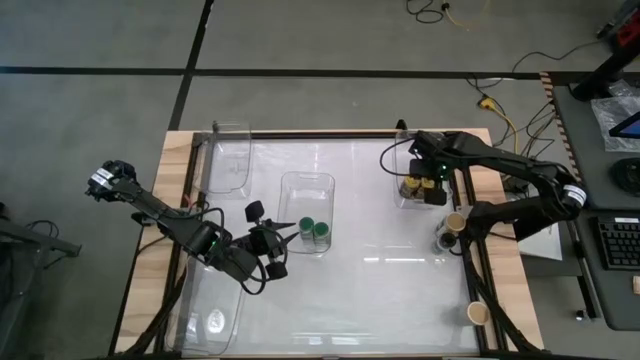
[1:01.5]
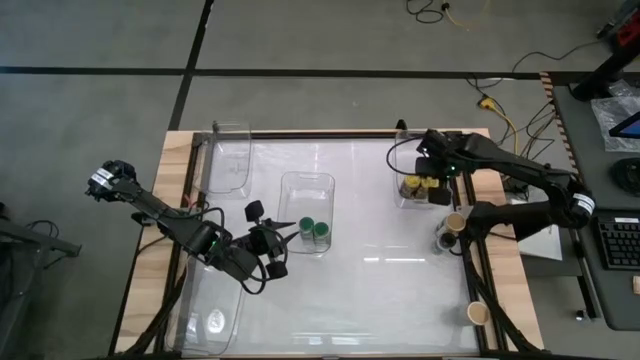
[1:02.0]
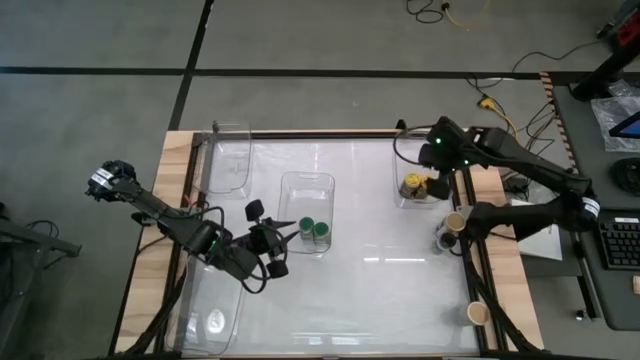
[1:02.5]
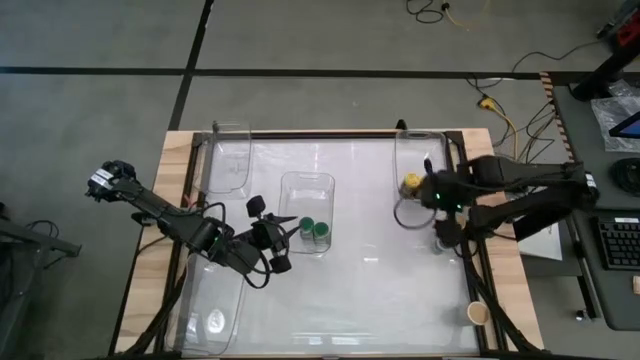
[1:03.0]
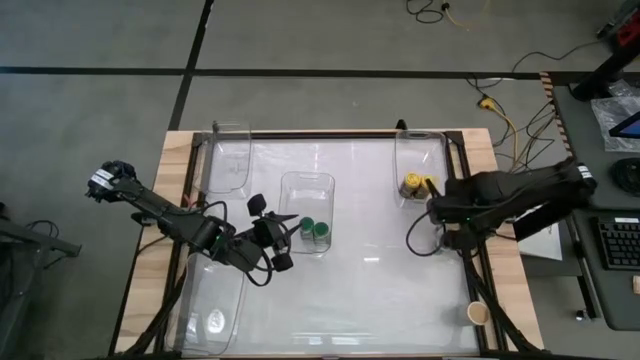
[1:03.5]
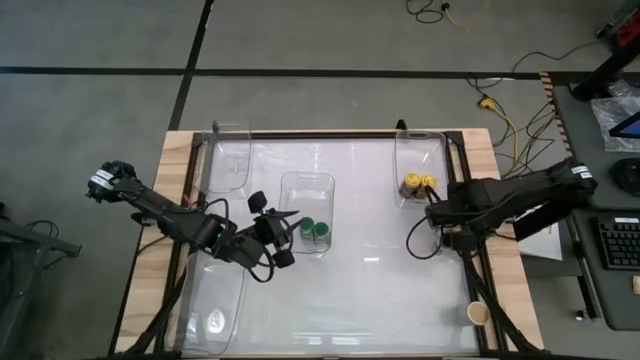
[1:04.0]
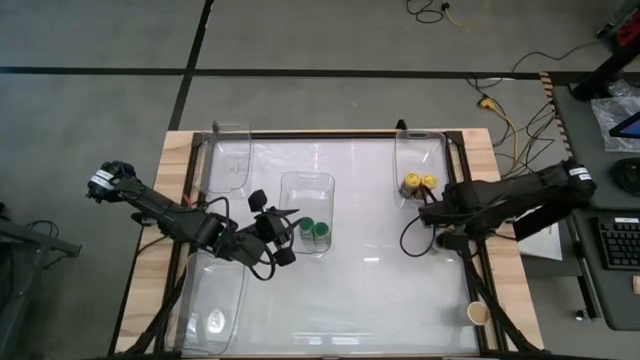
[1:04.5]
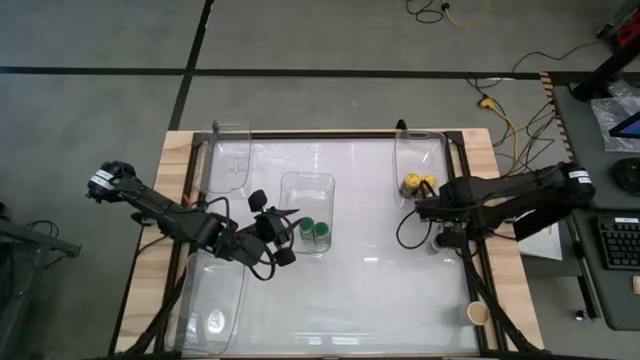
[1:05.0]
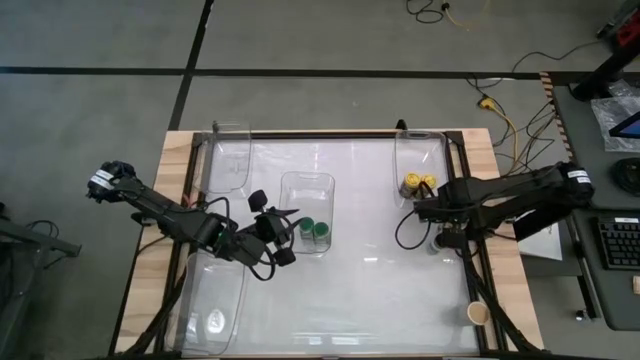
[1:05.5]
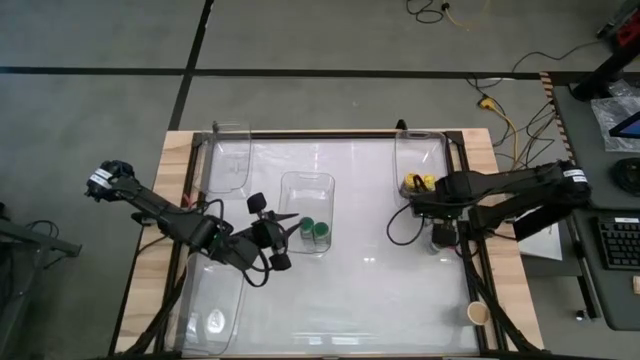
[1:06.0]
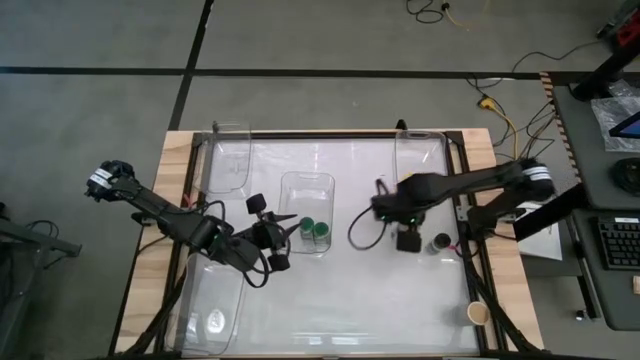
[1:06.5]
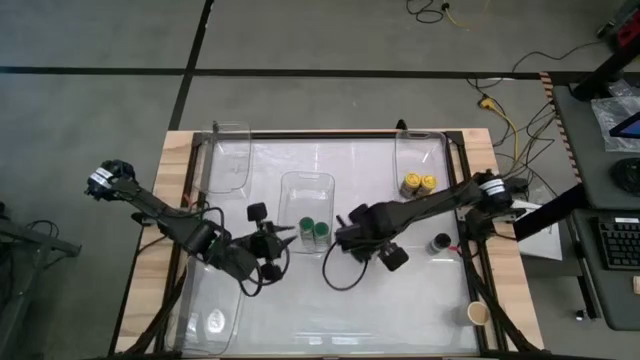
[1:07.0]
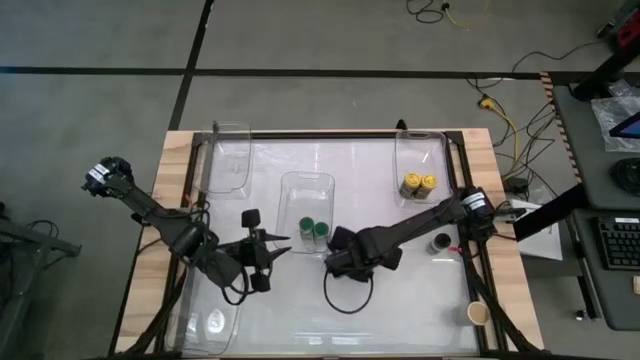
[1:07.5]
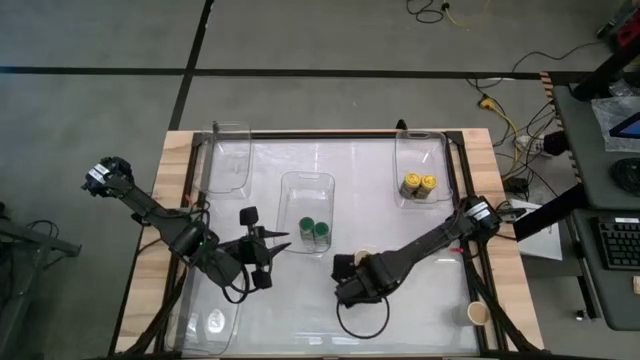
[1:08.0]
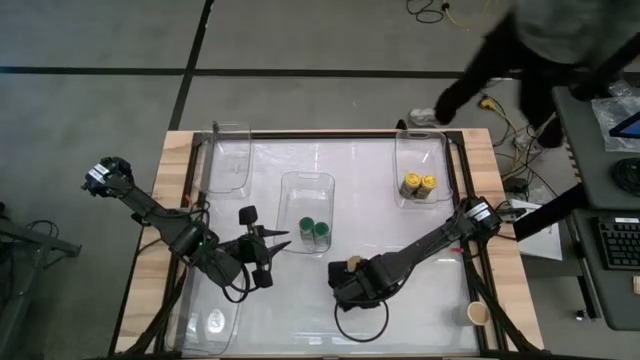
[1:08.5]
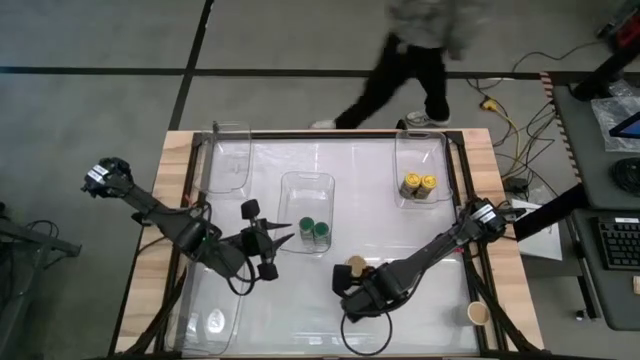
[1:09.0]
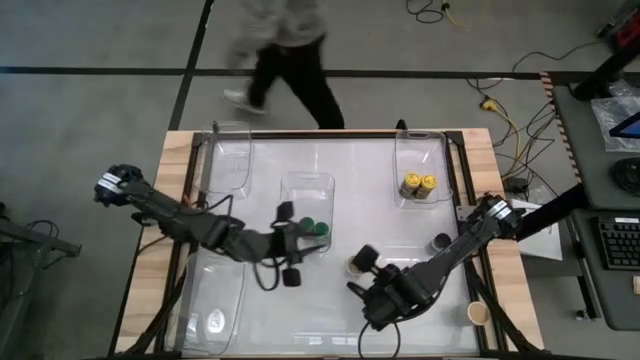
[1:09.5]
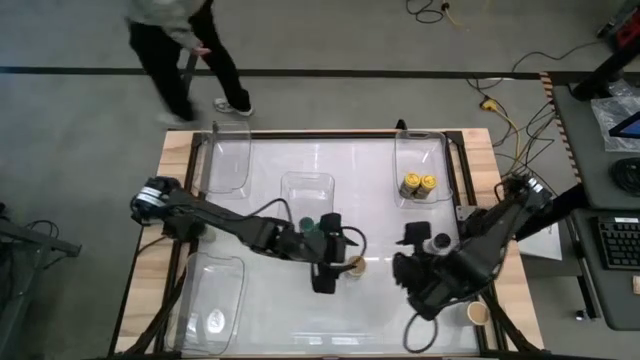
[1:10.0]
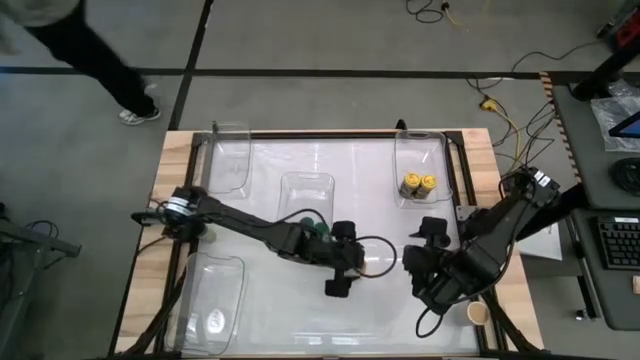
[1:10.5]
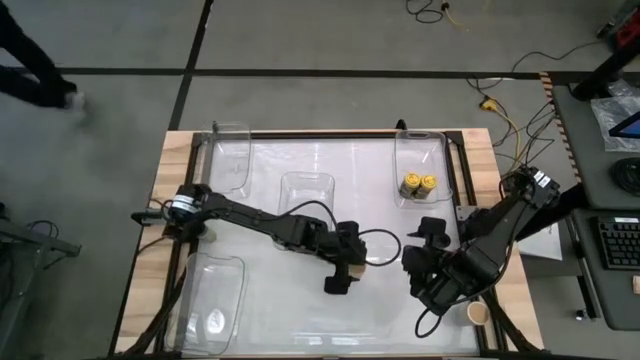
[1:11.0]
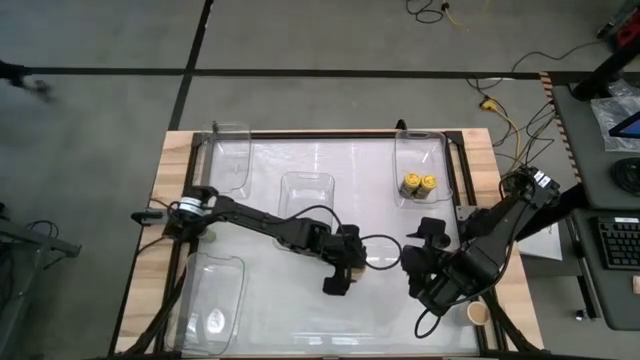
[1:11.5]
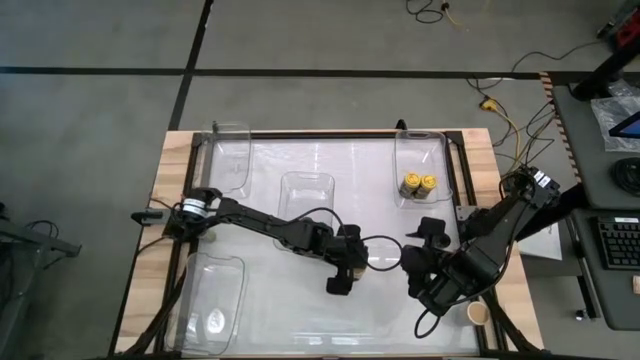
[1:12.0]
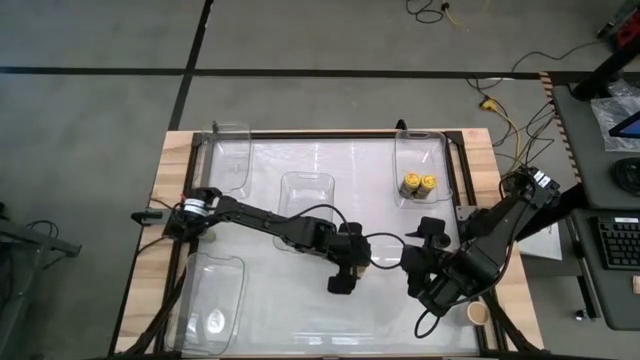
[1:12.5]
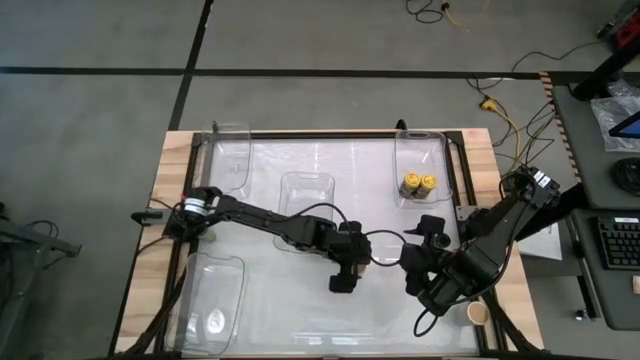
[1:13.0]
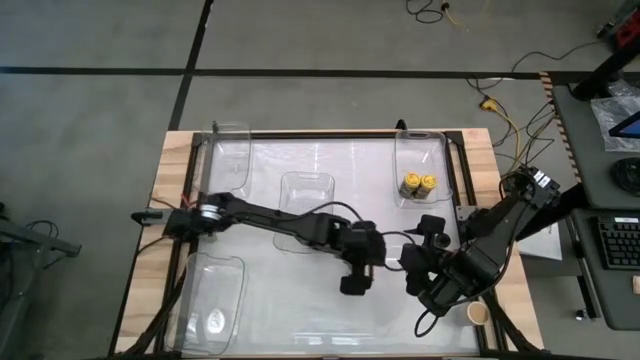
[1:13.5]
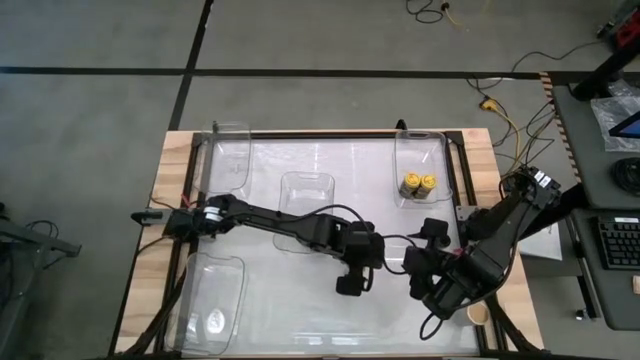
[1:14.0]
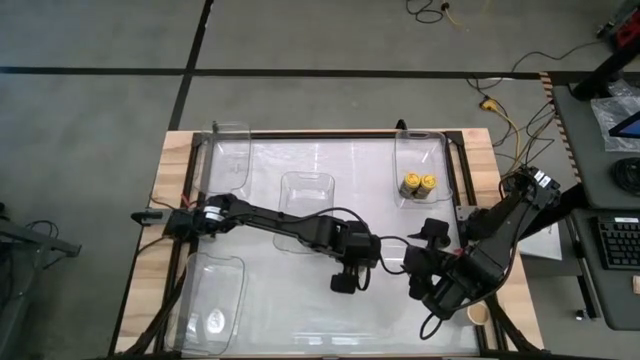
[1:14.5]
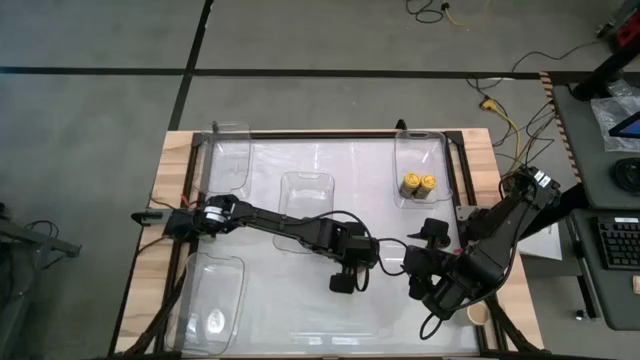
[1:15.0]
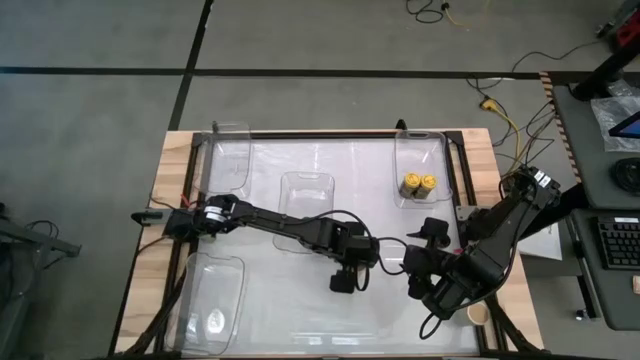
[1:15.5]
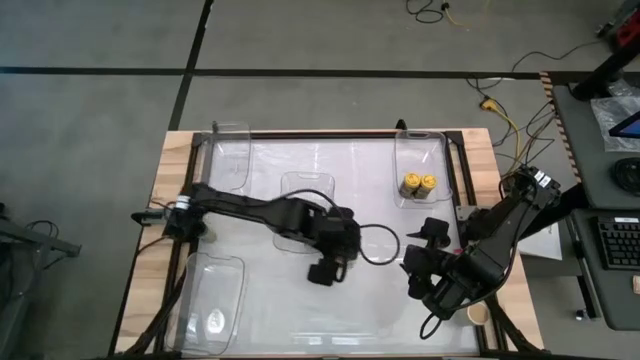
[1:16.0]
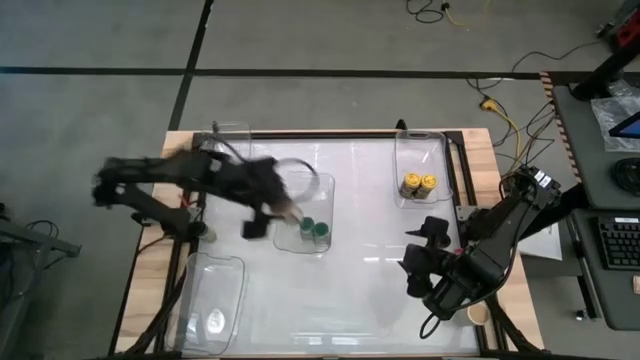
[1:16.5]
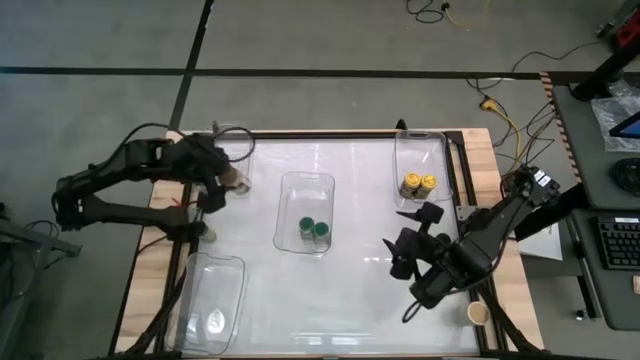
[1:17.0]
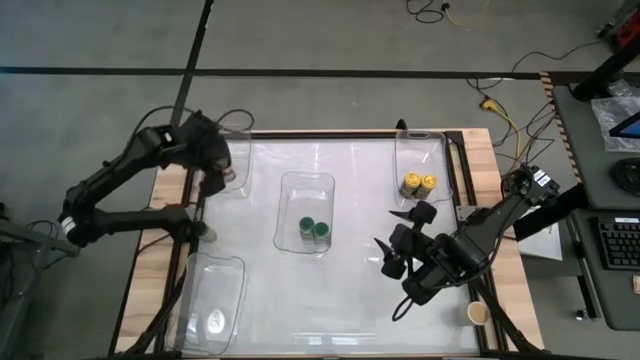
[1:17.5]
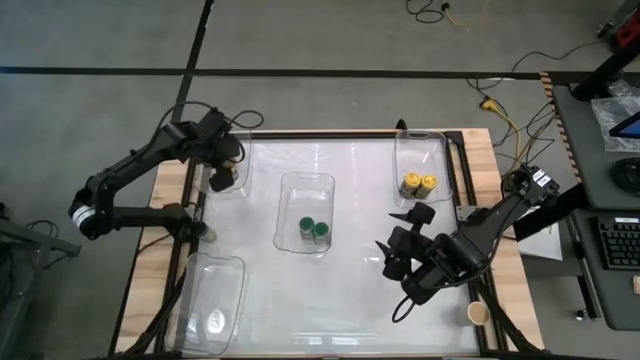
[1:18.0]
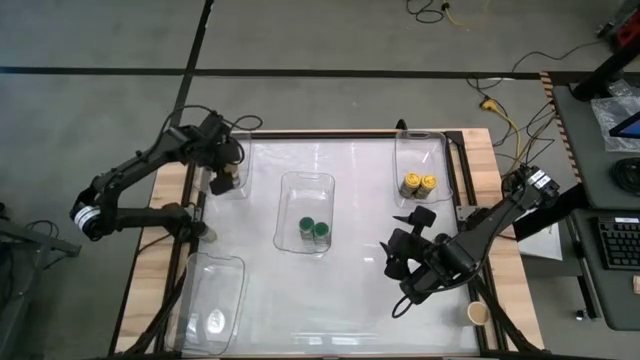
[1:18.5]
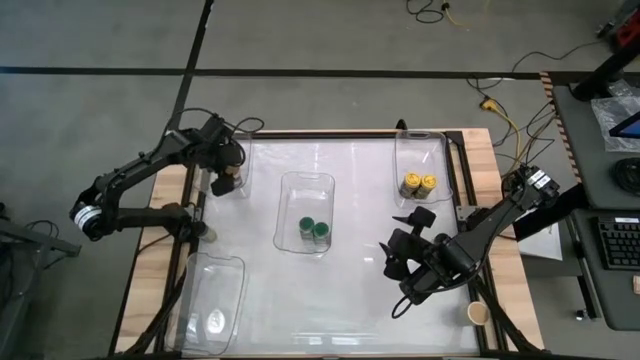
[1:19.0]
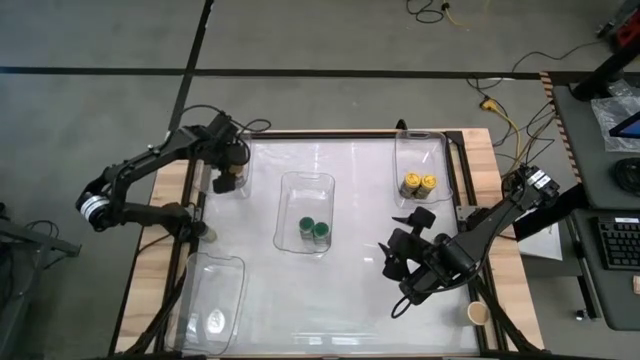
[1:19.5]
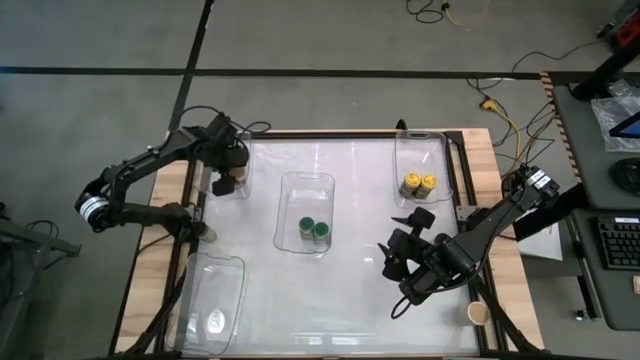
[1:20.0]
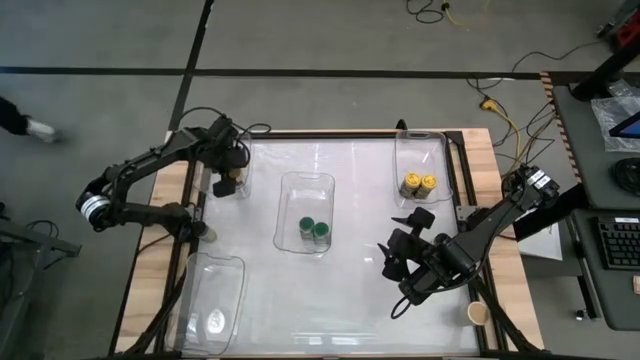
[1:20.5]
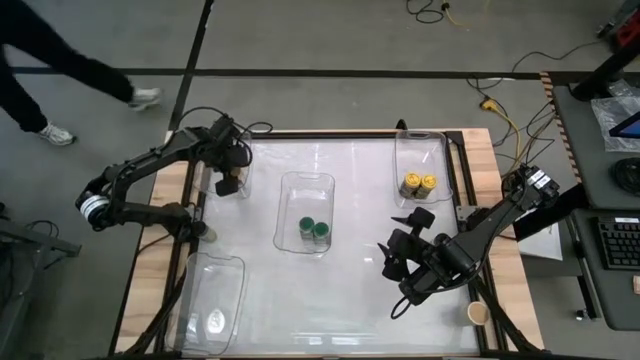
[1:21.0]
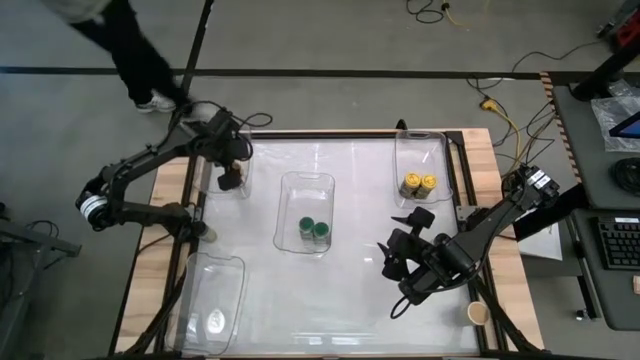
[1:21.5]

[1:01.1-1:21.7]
Task: Sort spices by type
Put the top golden seasoning bottle into the top left transparent bin

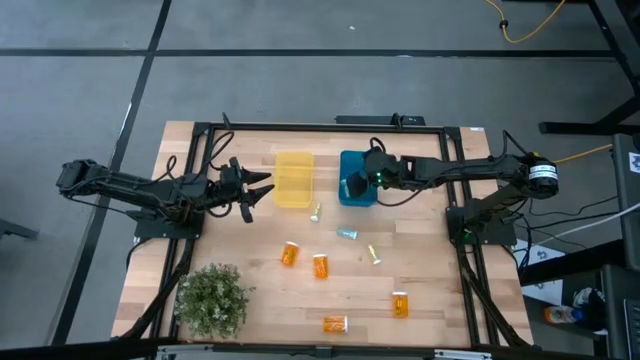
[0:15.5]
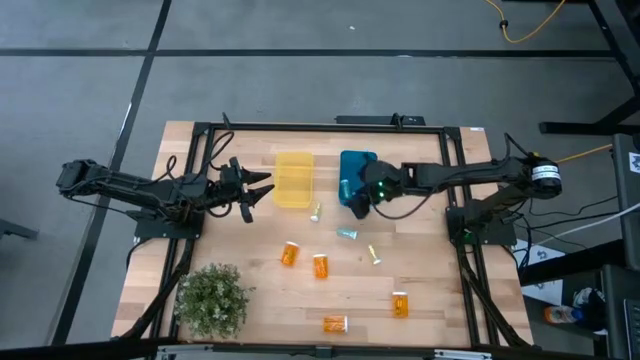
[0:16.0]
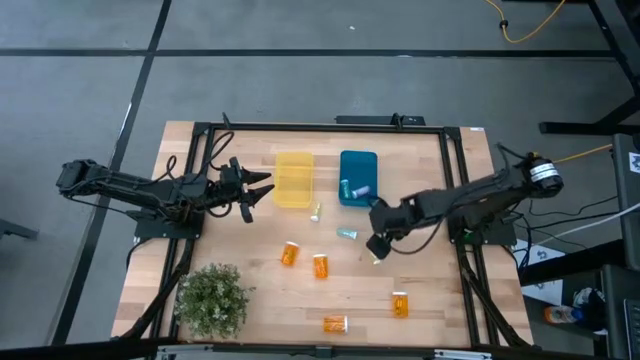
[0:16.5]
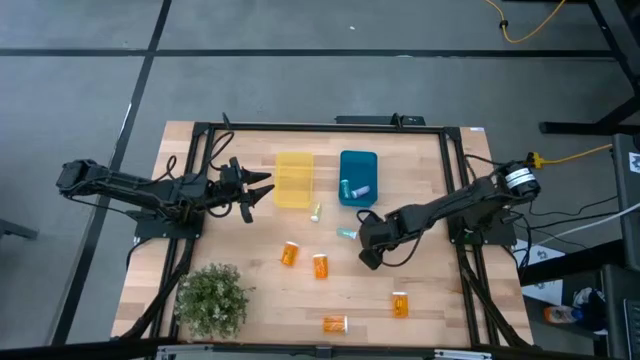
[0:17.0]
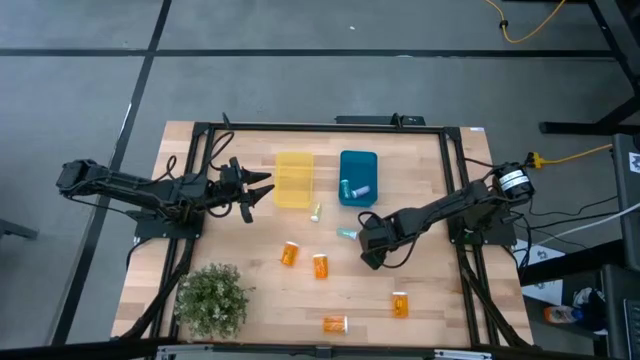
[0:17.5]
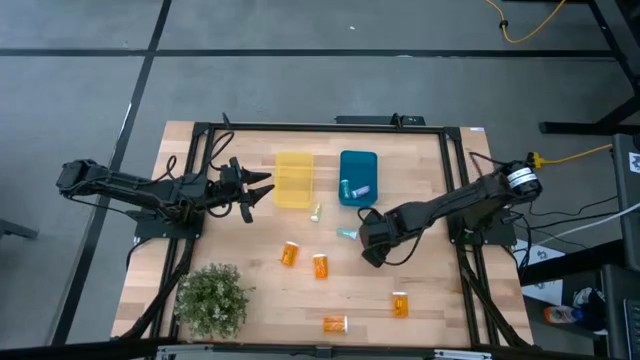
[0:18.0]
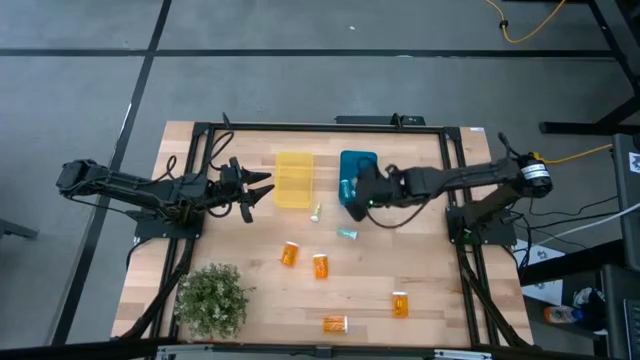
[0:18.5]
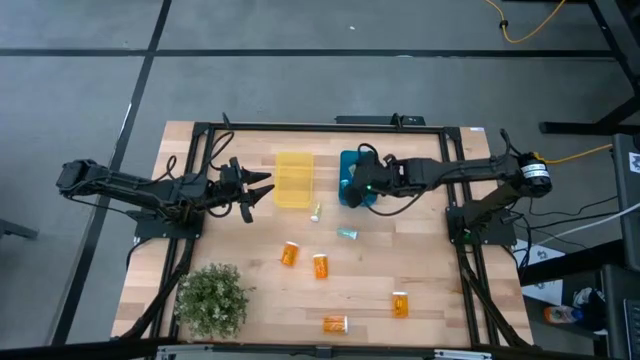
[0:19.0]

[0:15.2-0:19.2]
Task: Pick and place medicine bottles into bin by pill shape (circle, oval)
Put the right yellow pill bottle into the blue bin
